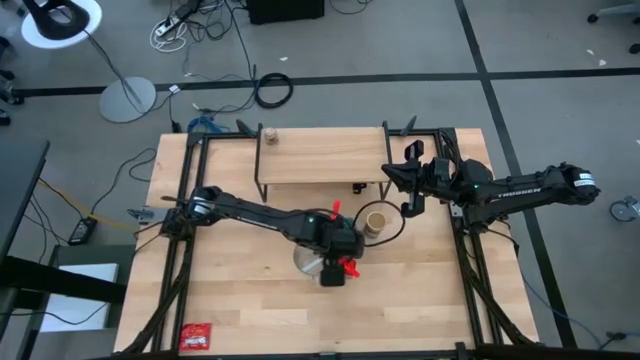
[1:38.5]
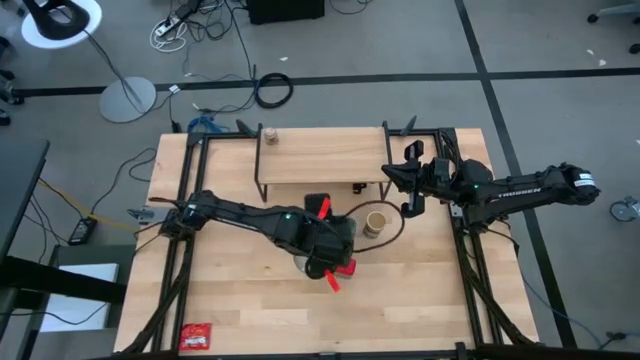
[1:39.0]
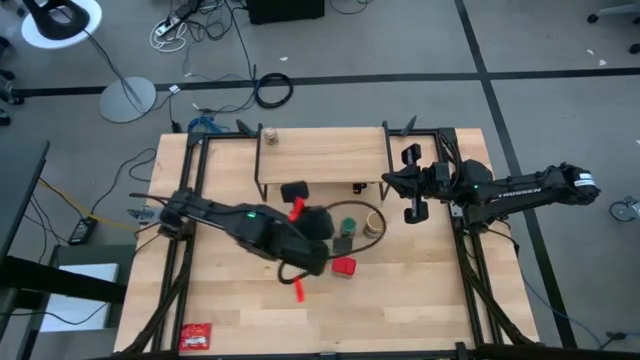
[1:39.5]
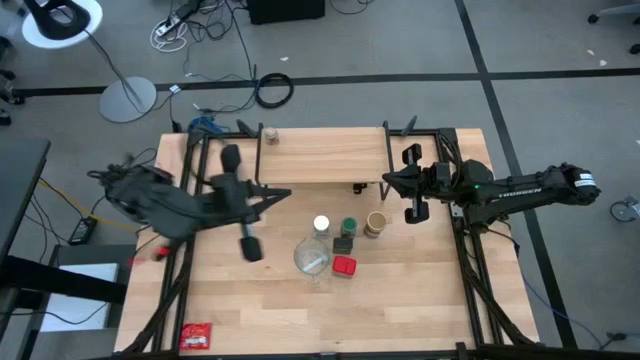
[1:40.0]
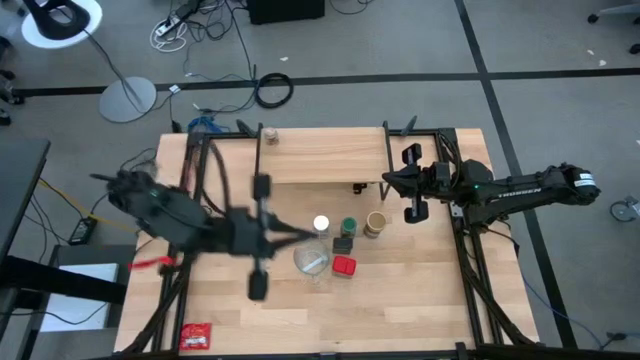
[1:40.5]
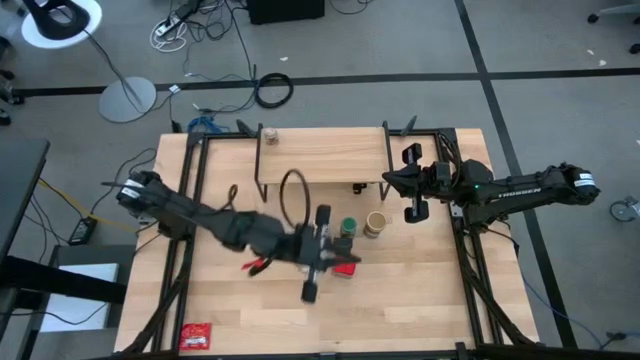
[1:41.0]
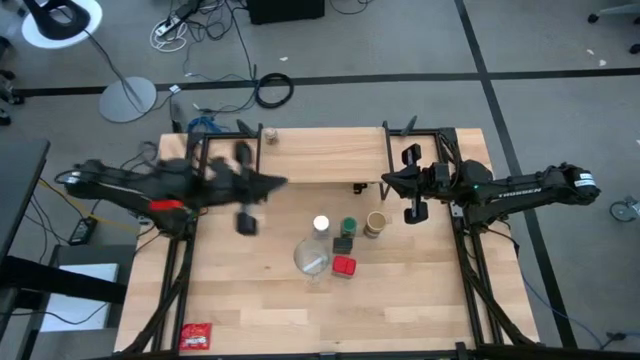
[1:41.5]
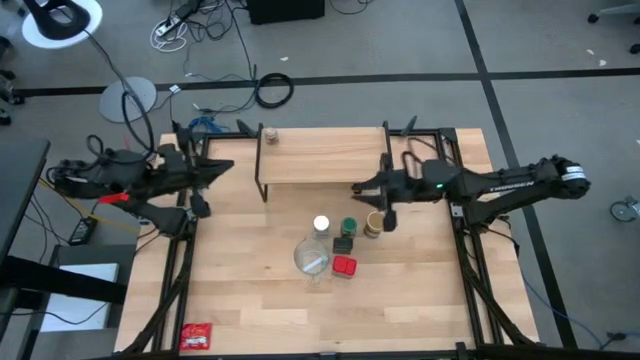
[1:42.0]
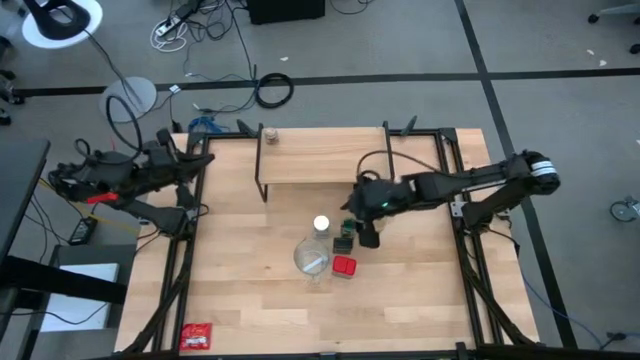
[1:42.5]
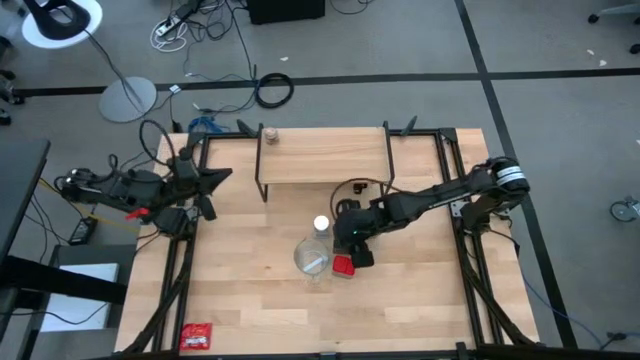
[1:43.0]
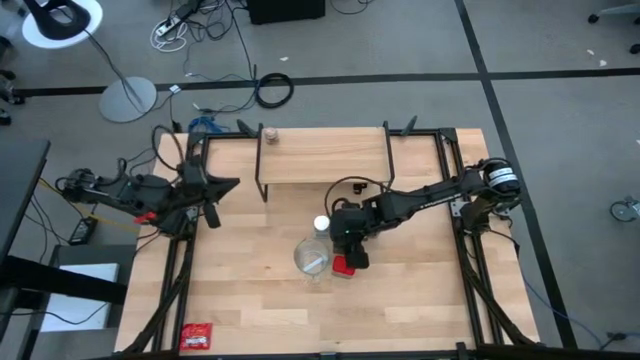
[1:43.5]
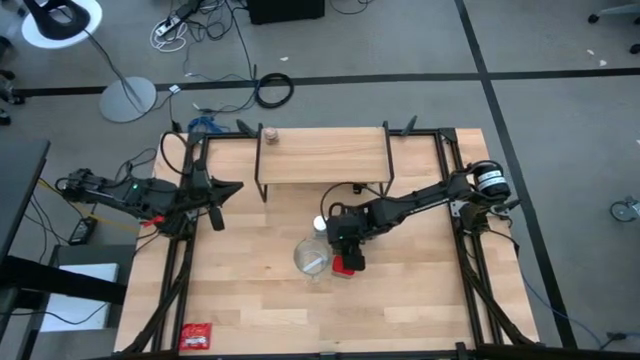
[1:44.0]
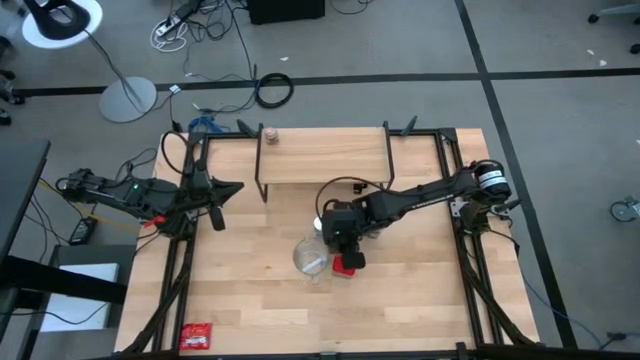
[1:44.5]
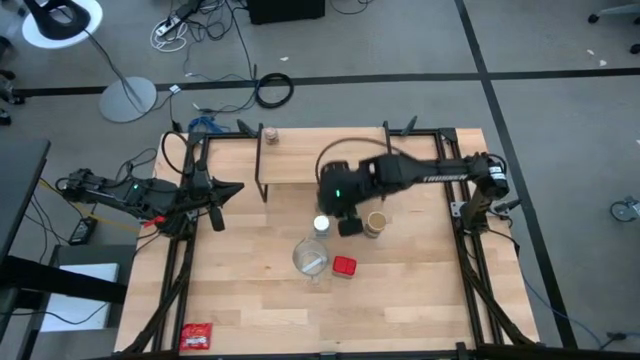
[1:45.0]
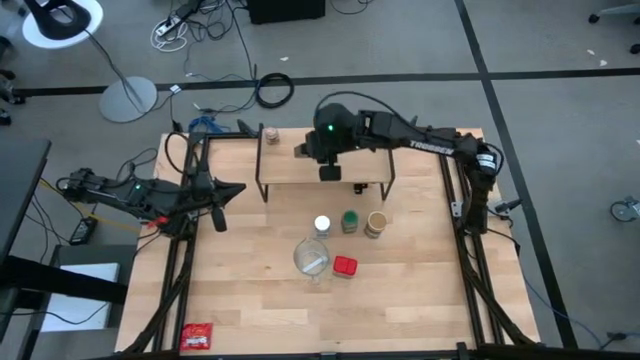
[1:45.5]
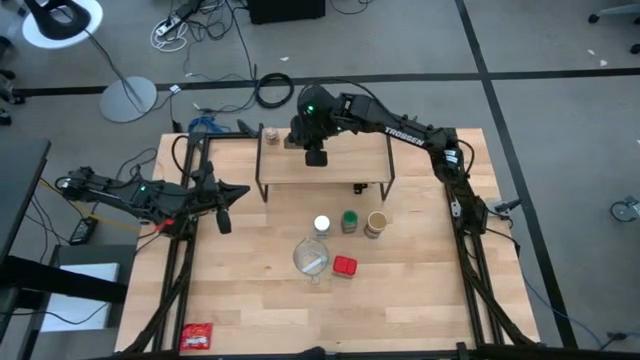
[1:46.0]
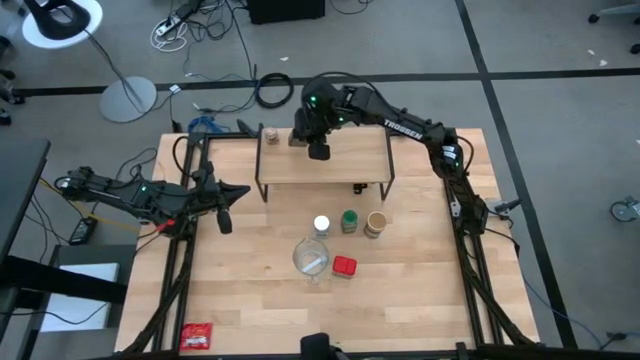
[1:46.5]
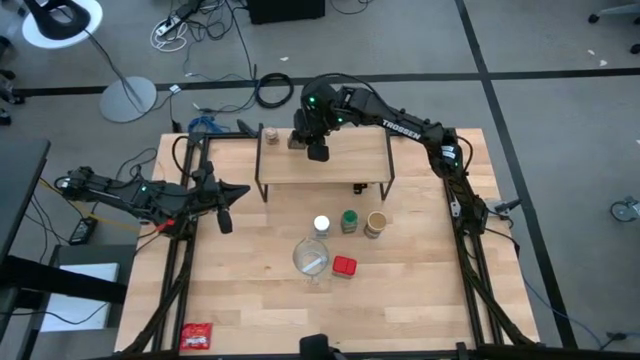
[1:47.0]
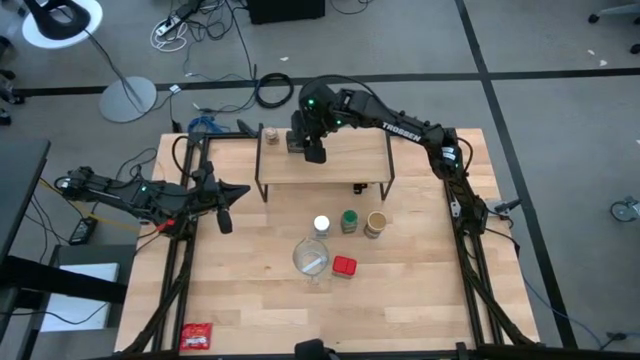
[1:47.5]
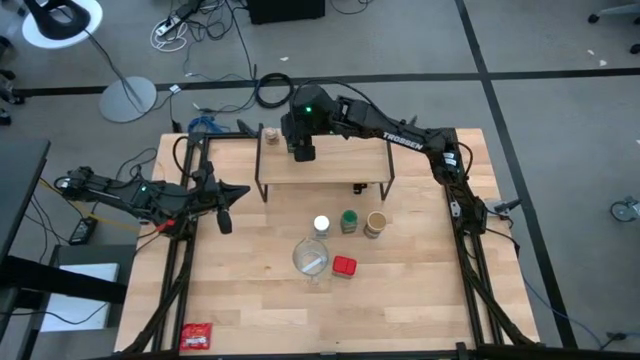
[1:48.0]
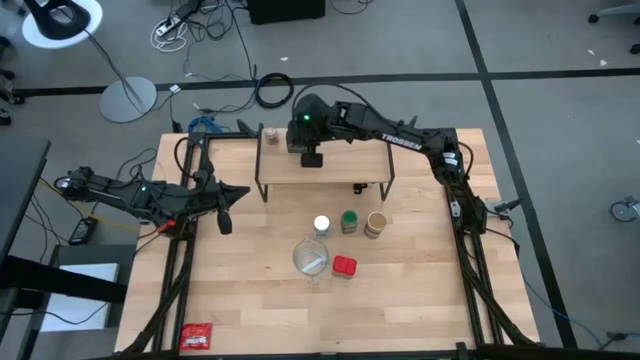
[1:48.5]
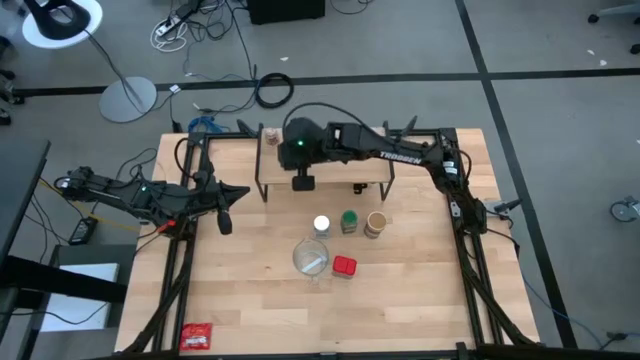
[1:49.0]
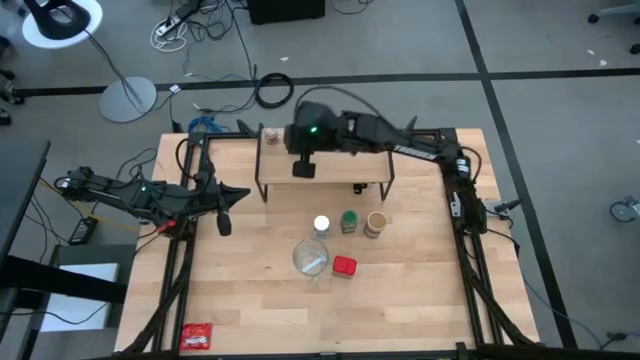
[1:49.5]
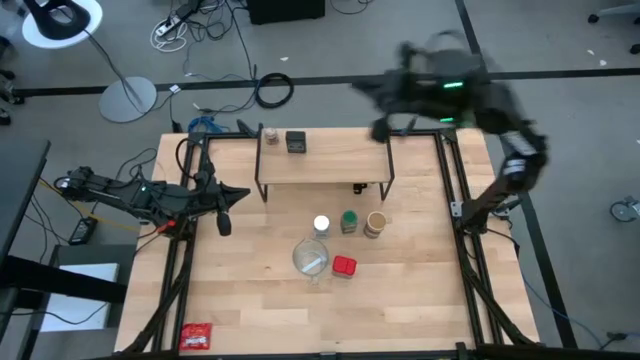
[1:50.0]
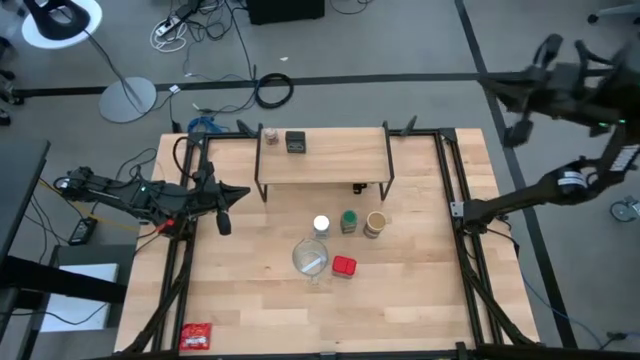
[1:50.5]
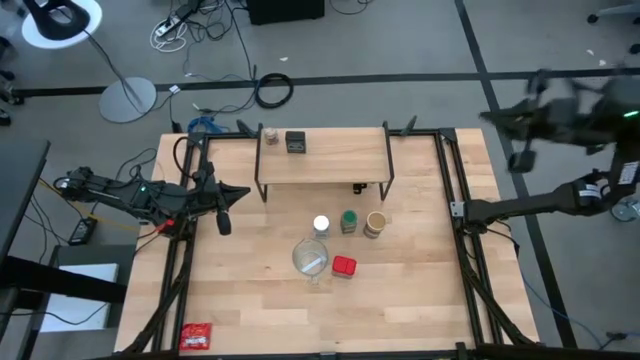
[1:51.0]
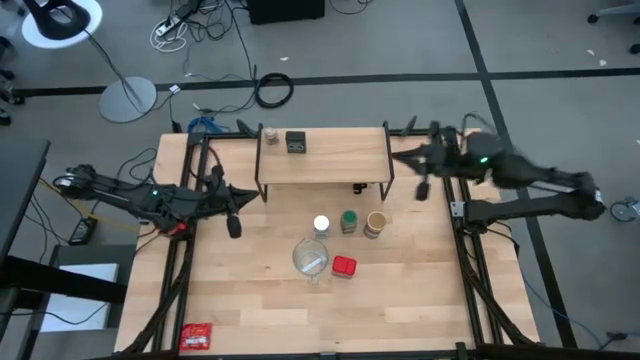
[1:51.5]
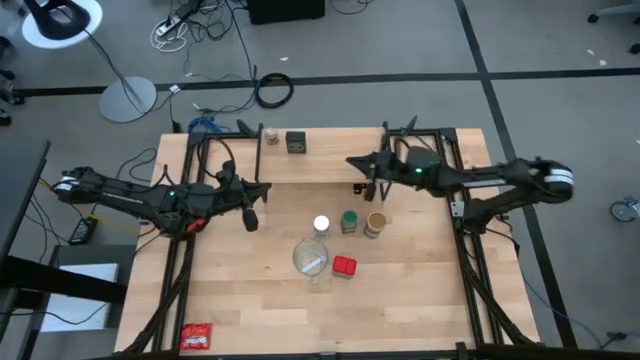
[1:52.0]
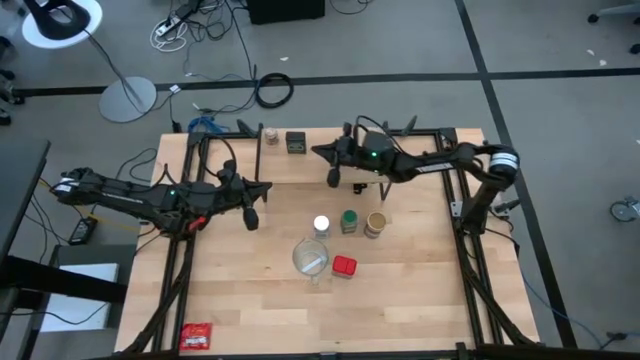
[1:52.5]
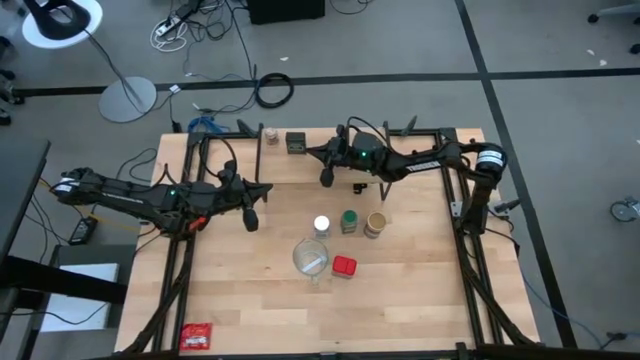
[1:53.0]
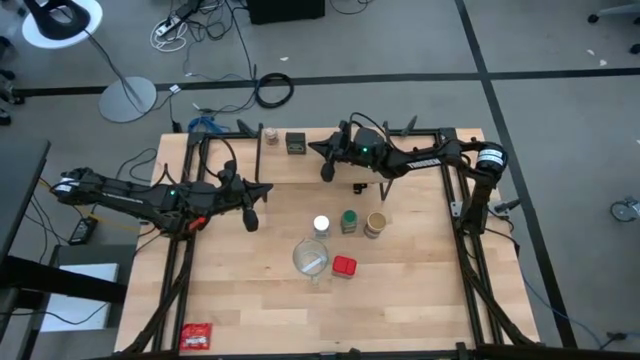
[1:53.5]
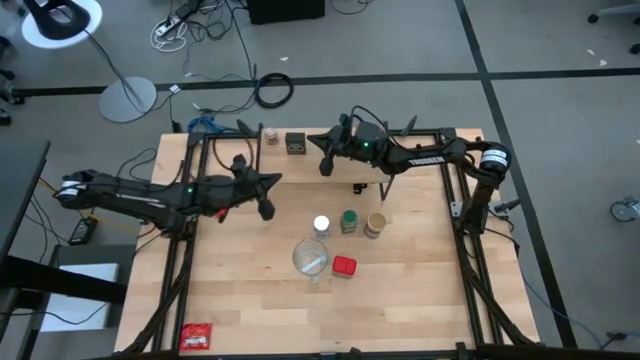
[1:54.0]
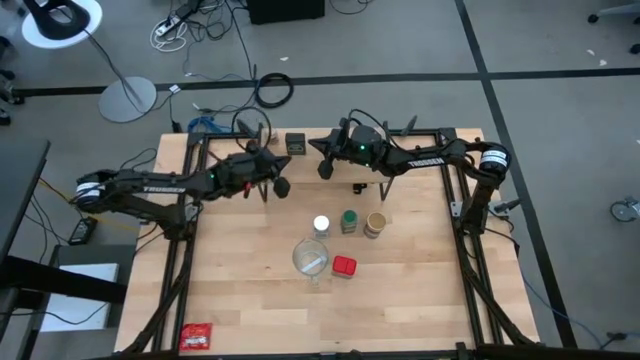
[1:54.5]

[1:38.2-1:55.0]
Task: Shelf spices
Put the black seasoning can on the shelf
